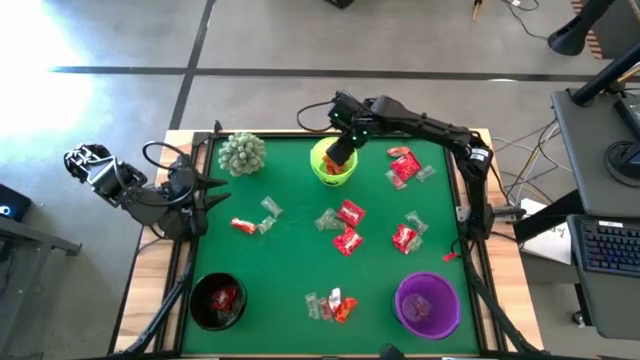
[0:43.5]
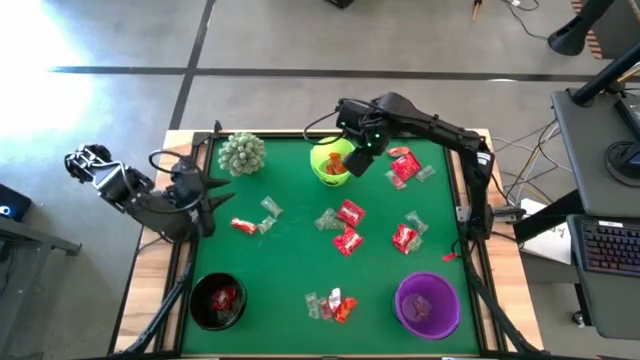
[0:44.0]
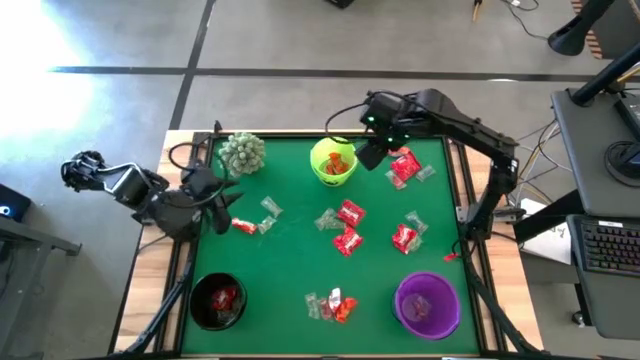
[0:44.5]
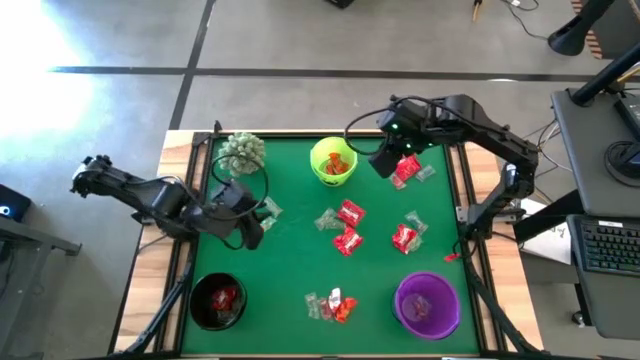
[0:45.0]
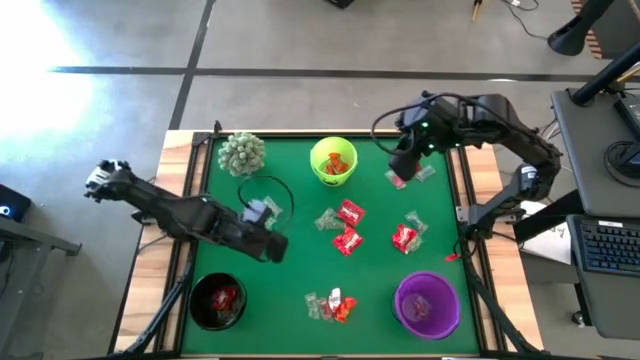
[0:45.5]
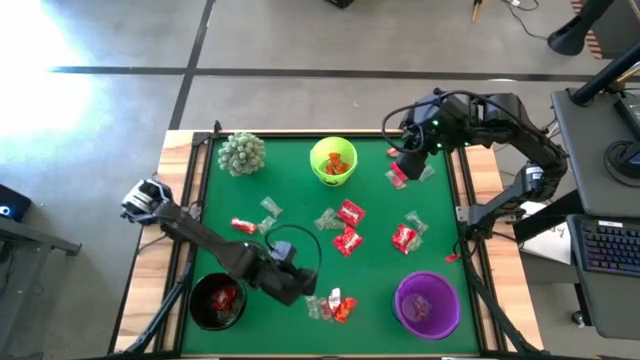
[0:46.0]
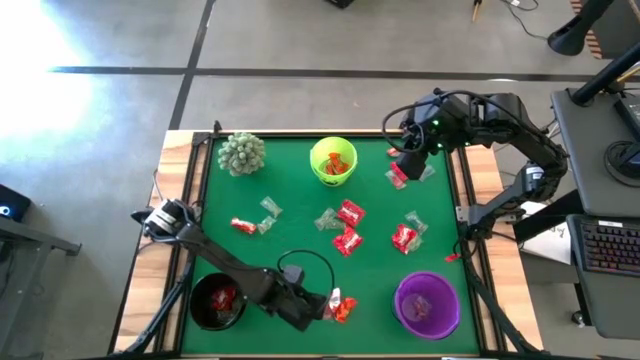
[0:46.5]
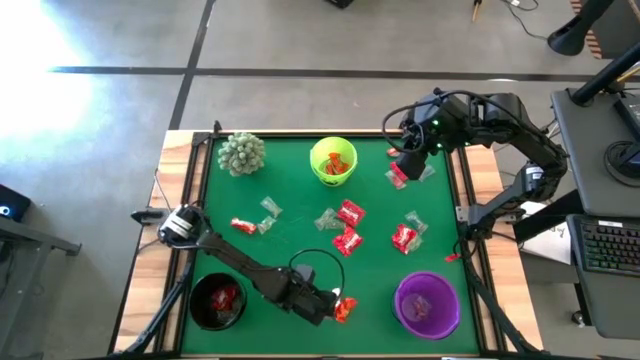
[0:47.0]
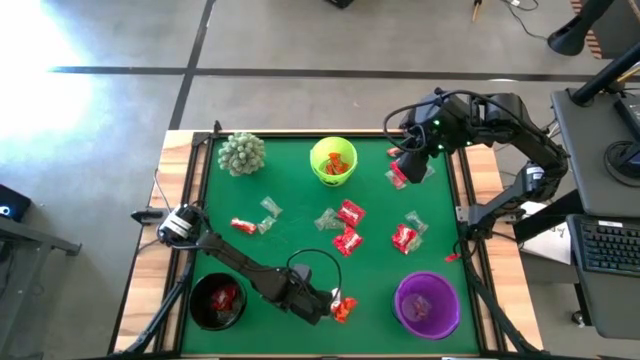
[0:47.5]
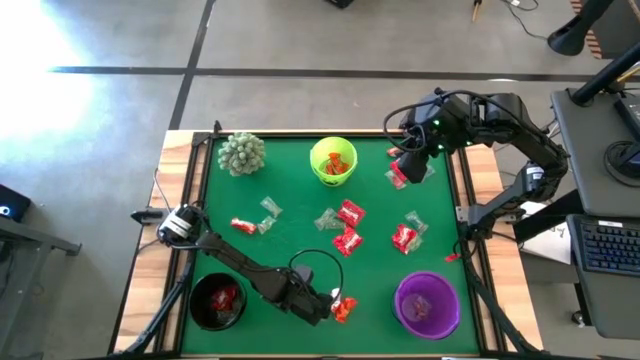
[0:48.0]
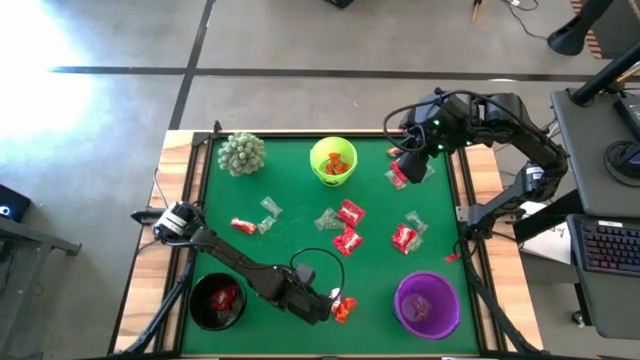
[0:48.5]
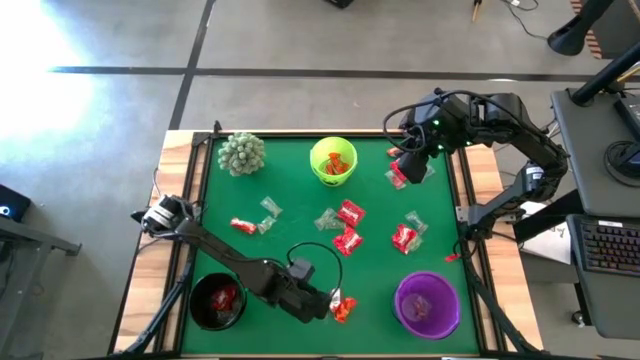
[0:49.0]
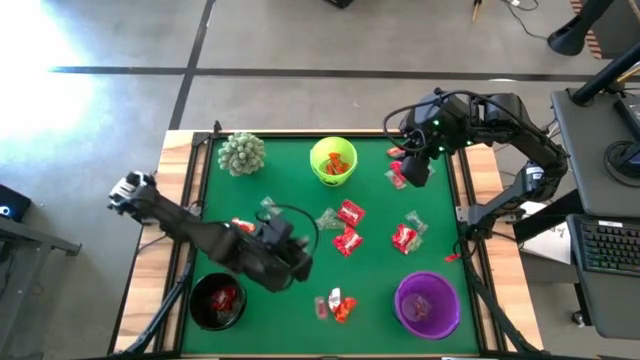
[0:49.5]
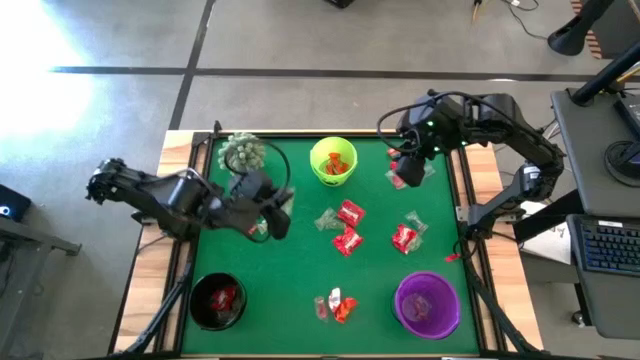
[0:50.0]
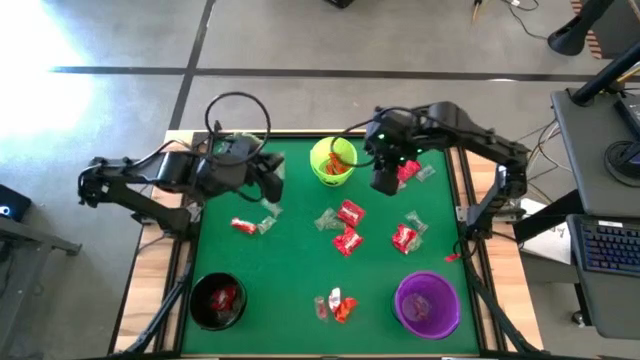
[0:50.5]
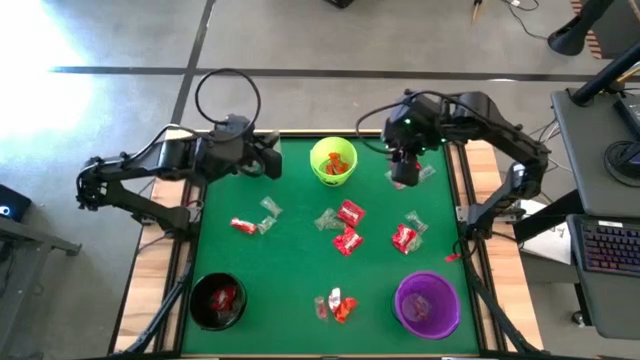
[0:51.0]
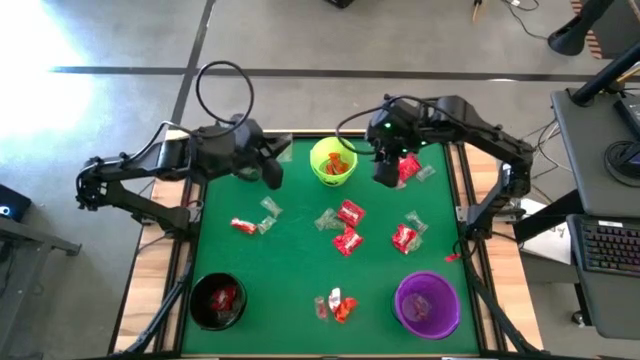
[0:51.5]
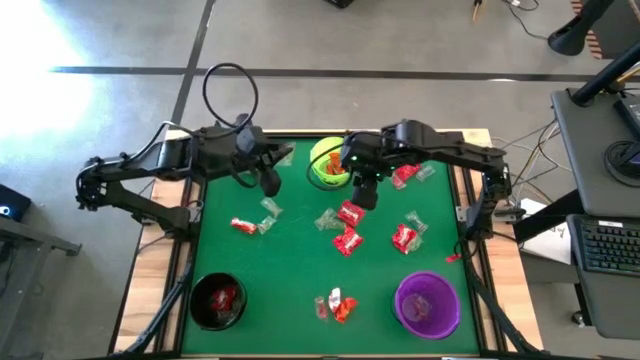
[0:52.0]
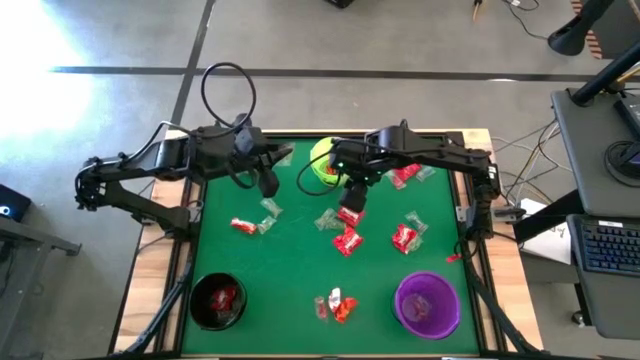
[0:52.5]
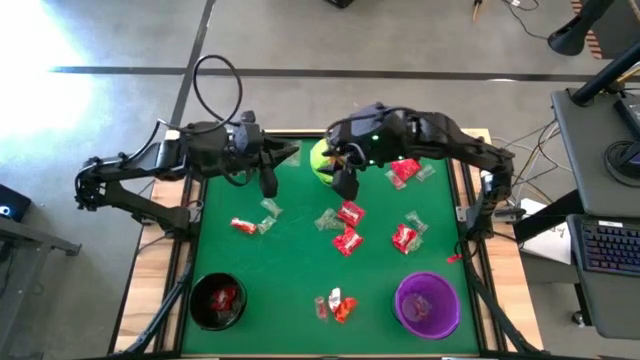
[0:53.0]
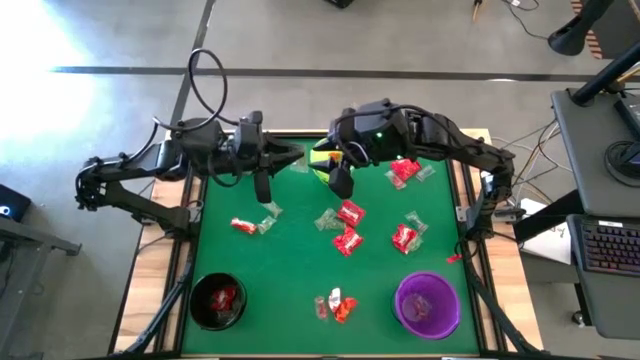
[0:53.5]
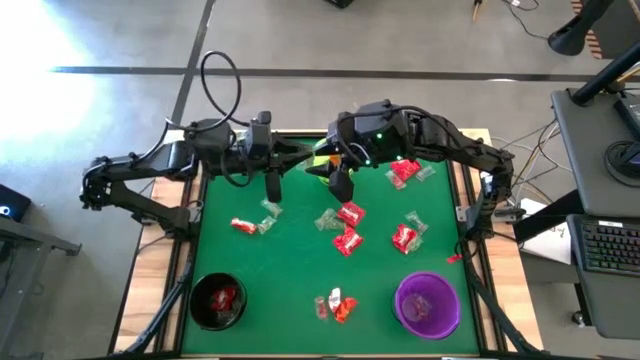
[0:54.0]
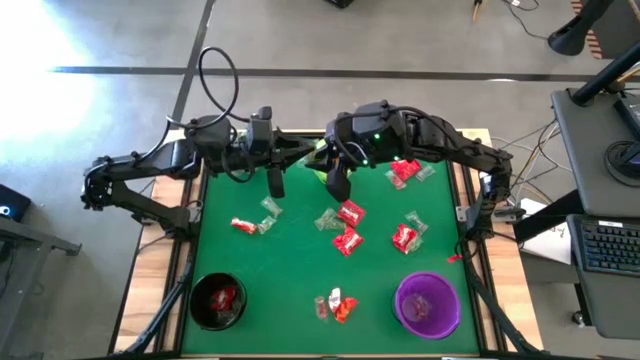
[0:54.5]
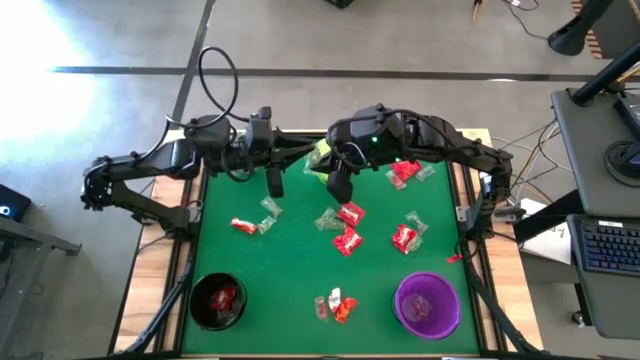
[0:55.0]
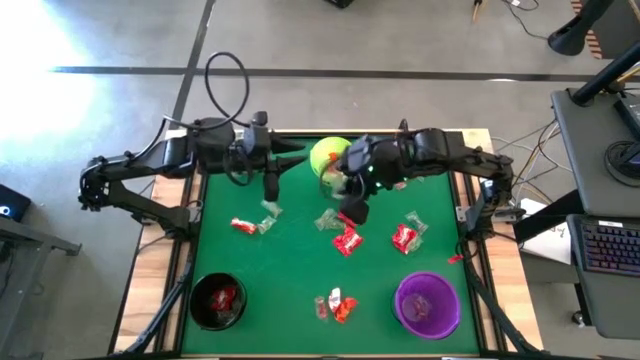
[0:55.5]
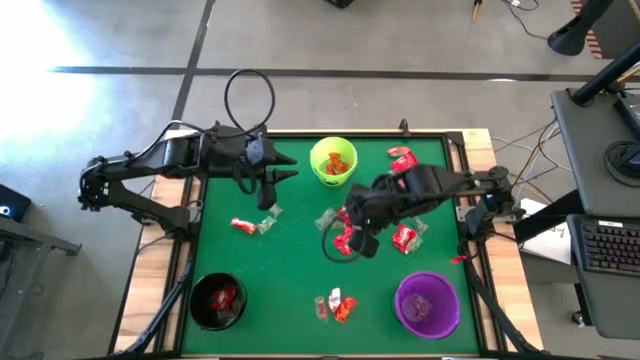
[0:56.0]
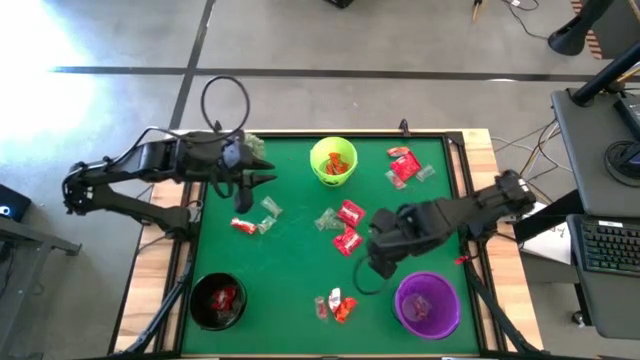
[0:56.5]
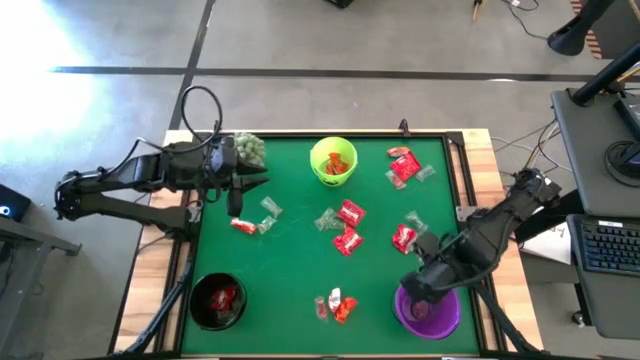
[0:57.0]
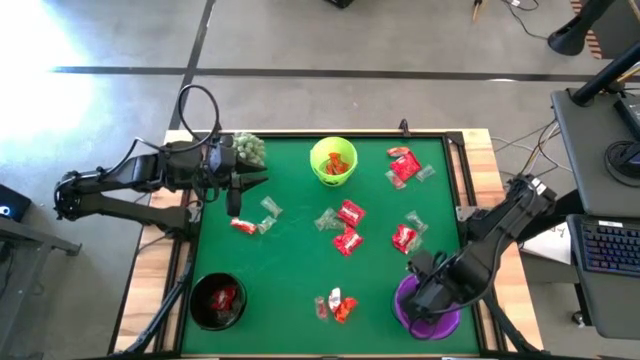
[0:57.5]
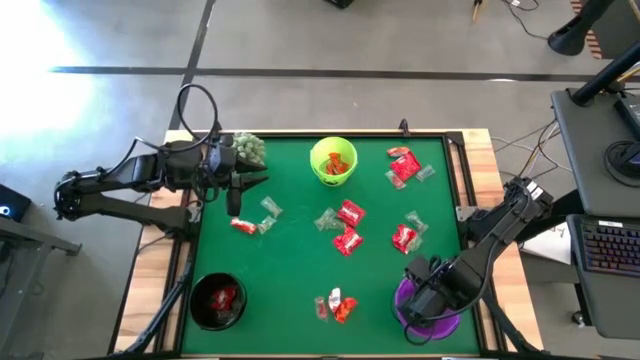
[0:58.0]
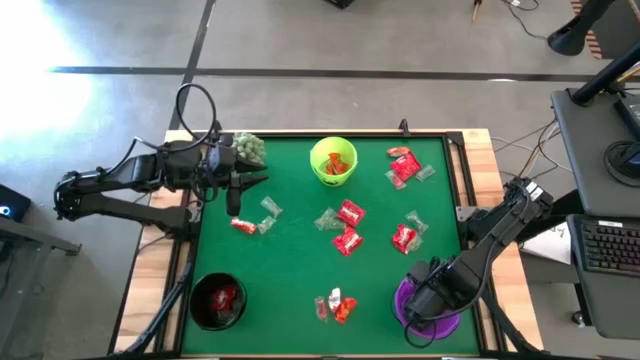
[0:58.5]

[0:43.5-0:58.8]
Task: Organize candy in baskets
Put the green candy into the violet bucket

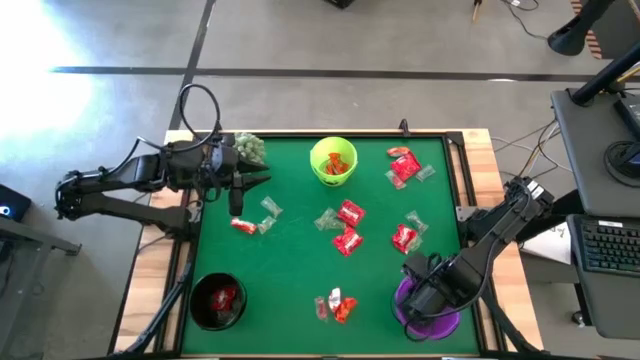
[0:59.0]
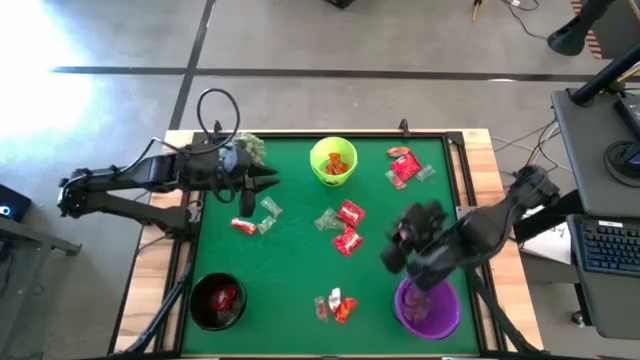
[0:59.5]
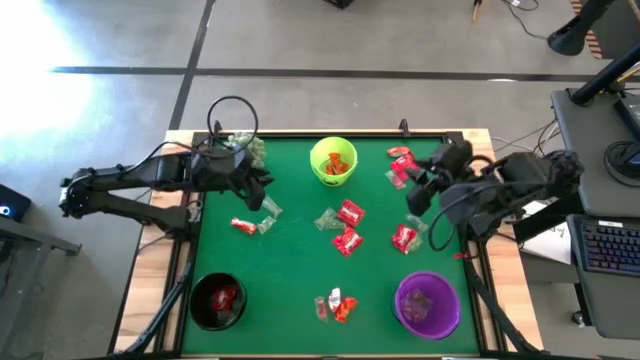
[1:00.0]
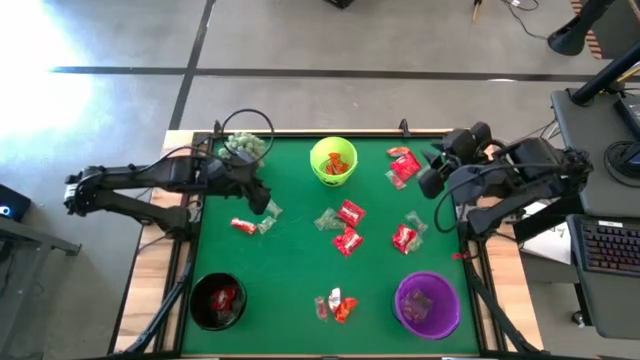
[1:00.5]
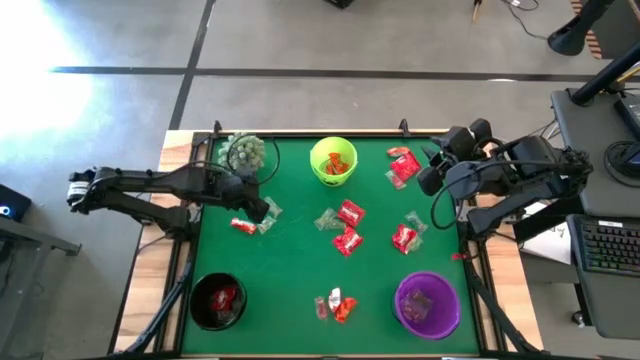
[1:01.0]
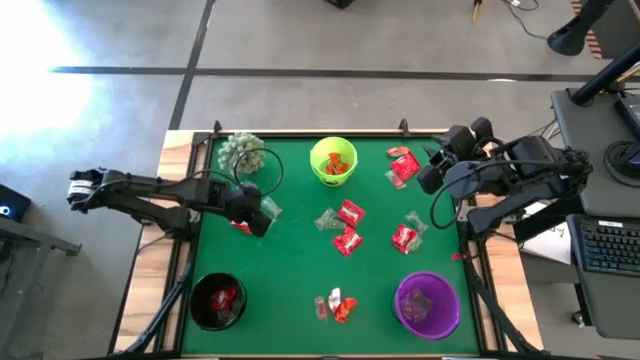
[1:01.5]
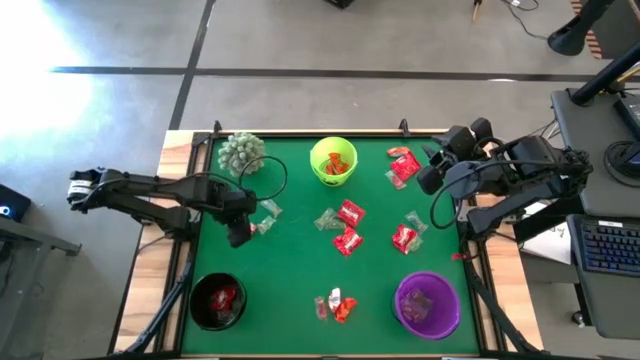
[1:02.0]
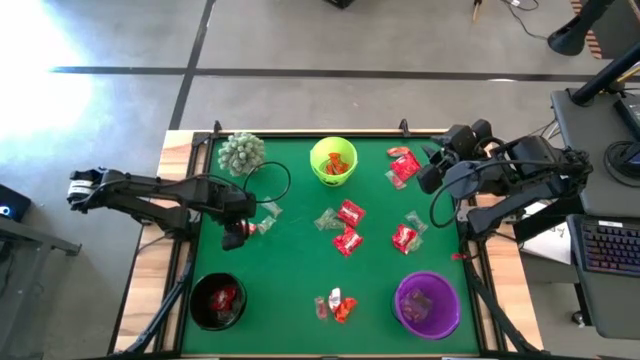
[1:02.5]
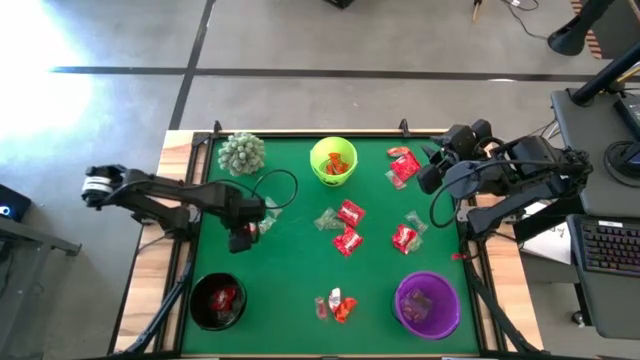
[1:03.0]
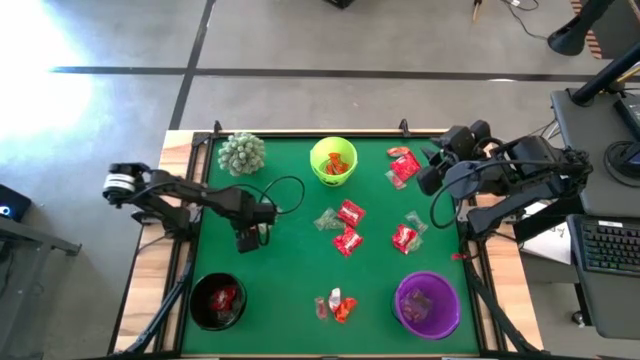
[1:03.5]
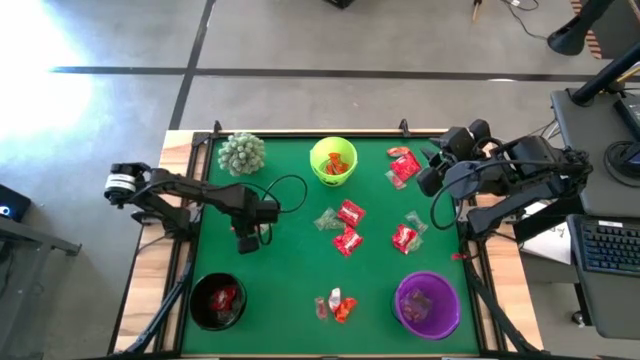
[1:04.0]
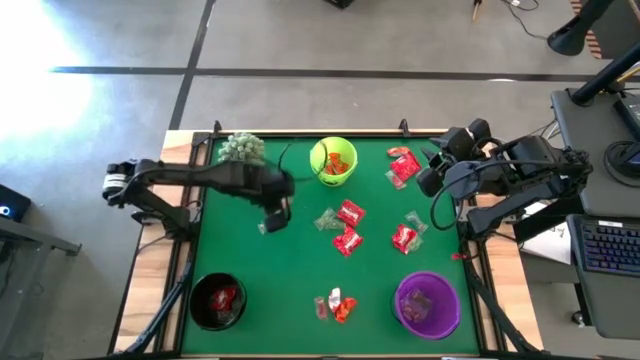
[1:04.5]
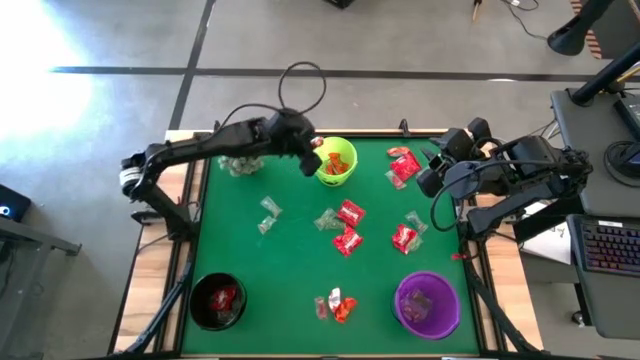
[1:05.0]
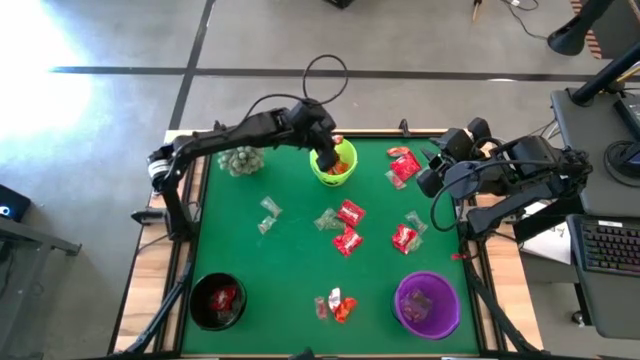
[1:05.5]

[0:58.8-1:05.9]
Put the orange chocolate bar into the green bucket
